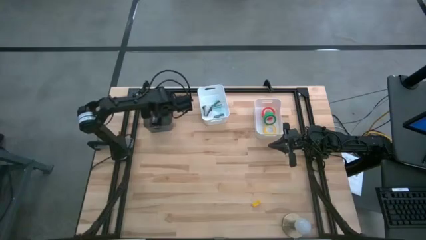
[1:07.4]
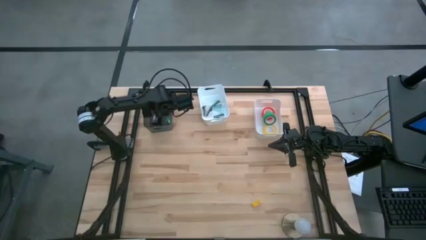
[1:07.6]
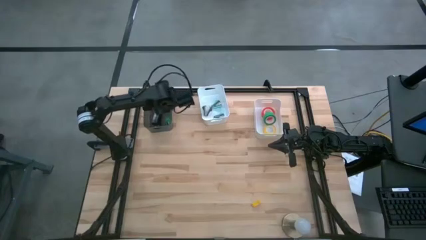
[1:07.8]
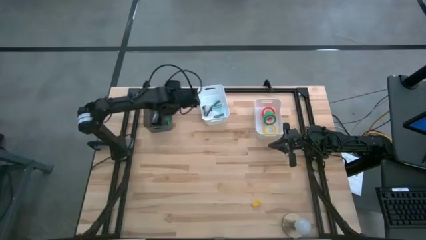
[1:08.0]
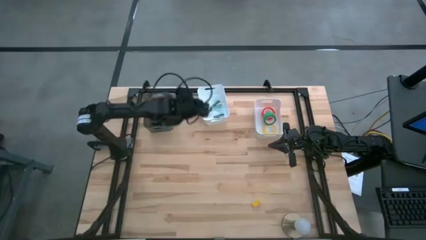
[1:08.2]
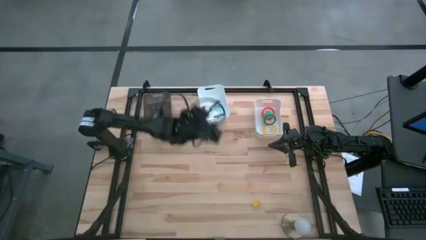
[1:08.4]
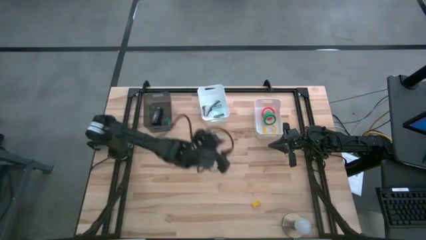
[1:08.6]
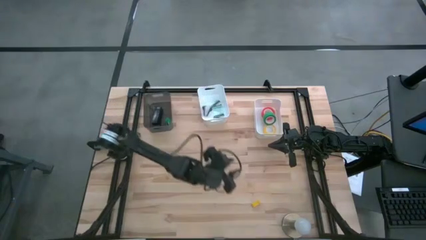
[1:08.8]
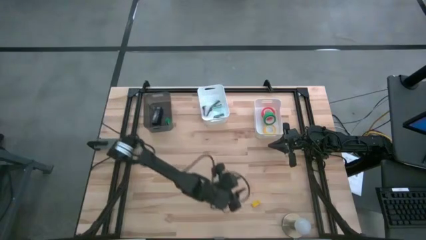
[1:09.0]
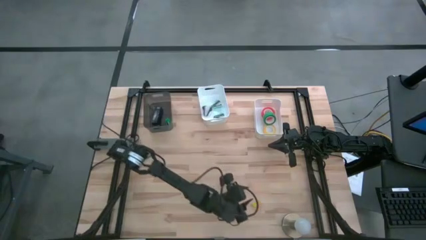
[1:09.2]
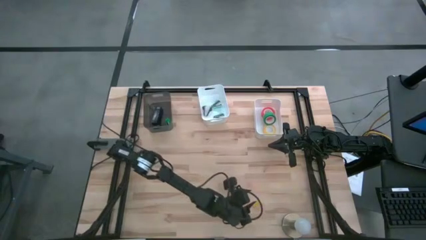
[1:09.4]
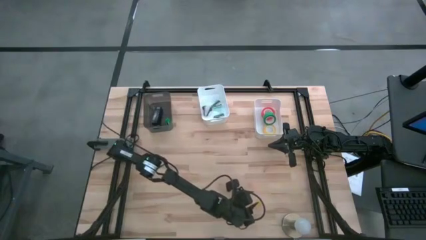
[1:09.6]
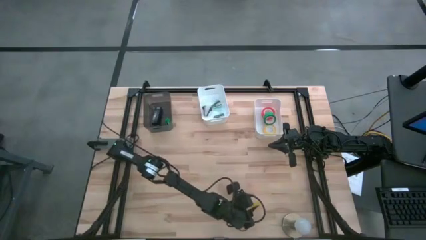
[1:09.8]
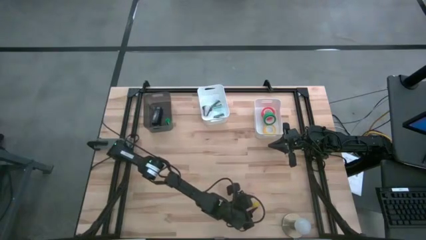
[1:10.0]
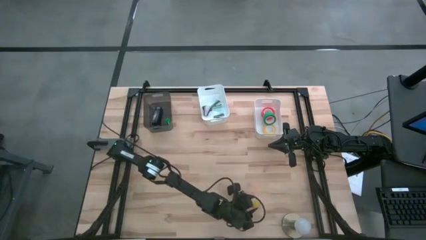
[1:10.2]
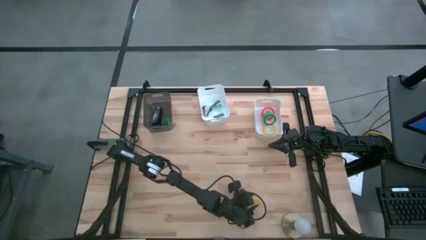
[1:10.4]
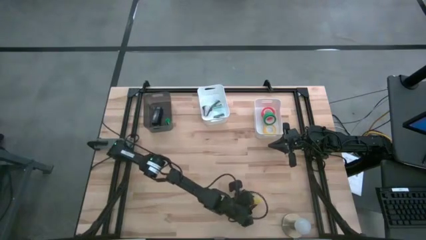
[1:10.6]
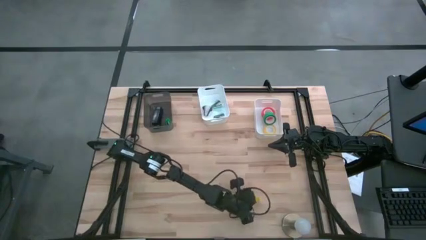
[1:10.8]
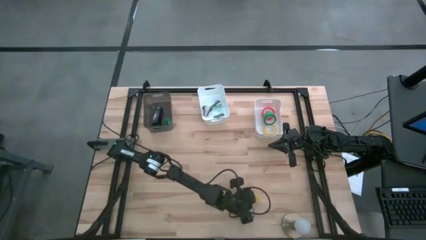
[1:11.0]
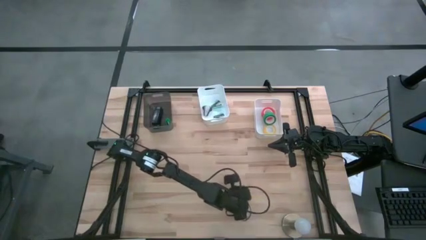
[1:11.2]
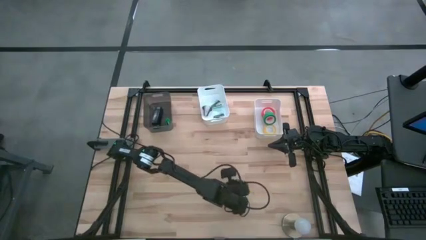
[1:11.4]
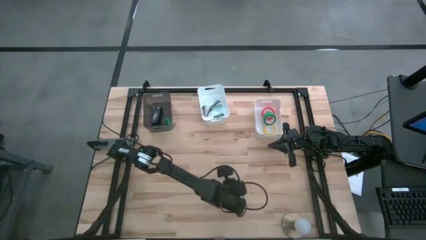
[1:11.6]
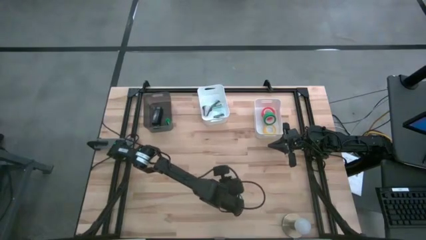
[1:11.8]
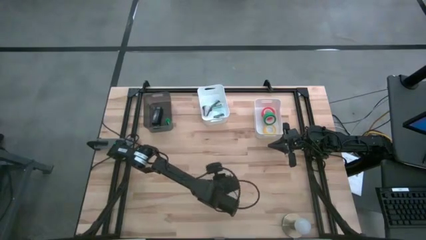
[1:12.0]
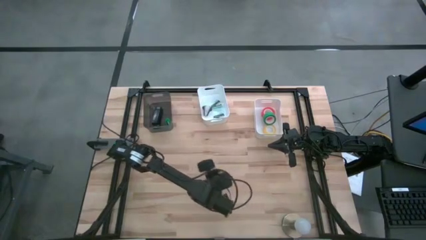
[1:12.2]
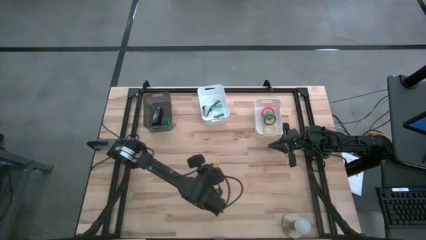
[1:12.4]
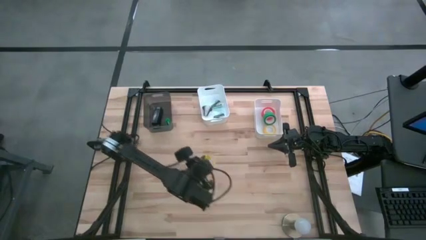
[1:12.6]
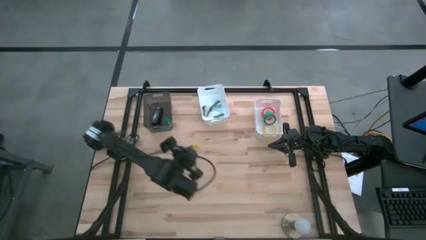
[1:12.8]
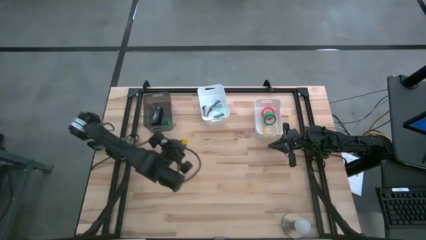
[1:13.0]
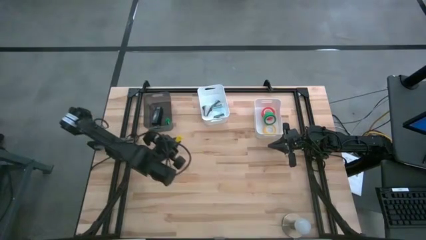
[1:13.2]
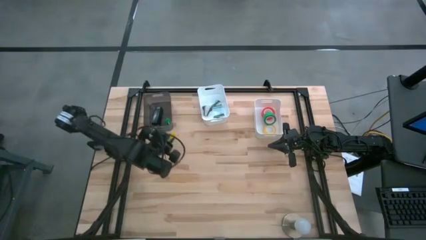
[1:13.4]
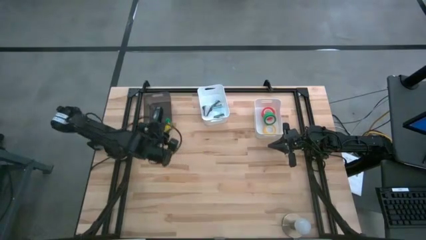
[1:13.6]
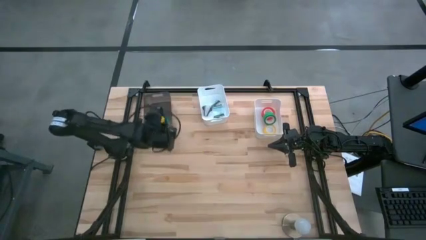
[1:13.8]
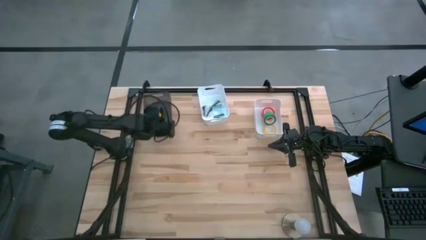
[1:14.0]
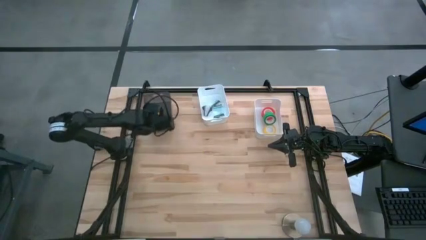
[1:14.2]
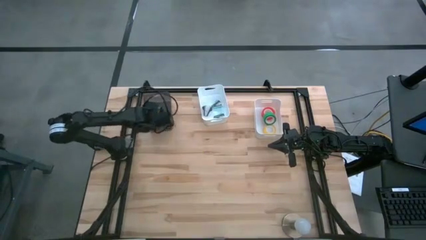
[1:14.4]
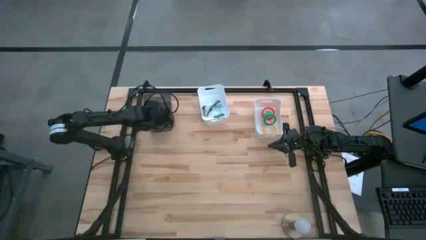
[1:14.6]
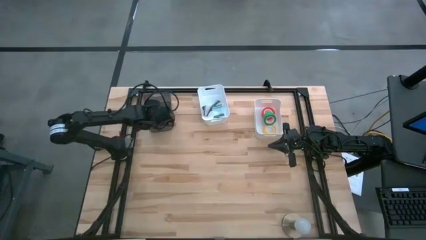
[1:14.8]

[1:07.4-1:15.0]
Task: Pick and place Stapler, Stapler remover, tape
Put the yellow stapler into the black bin

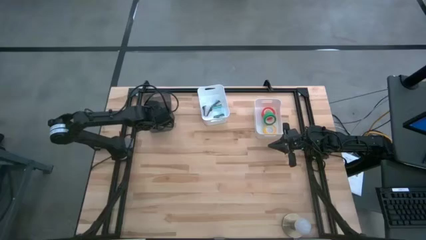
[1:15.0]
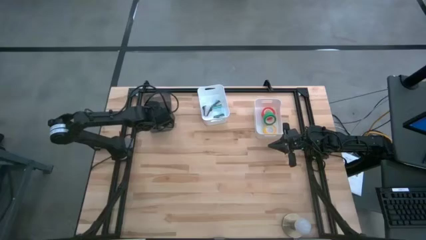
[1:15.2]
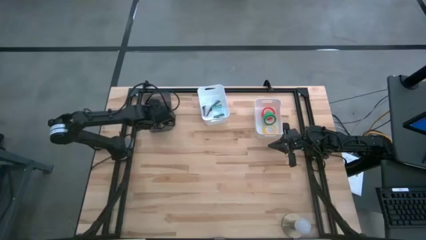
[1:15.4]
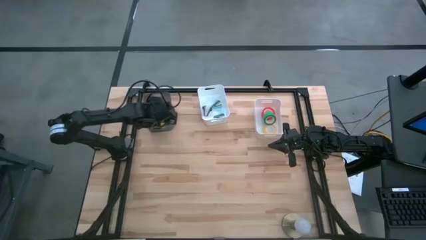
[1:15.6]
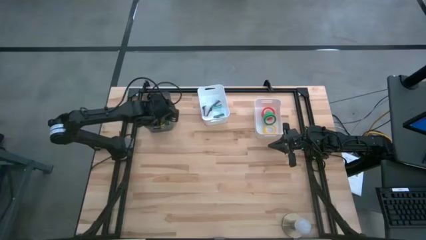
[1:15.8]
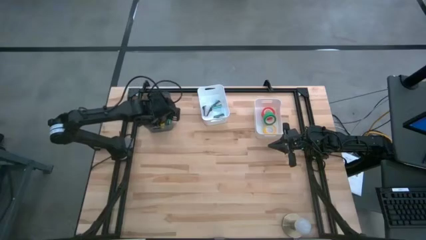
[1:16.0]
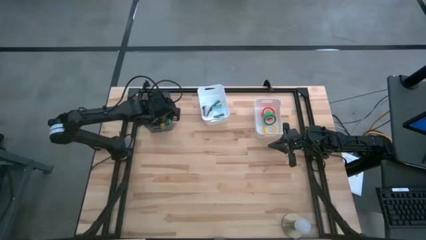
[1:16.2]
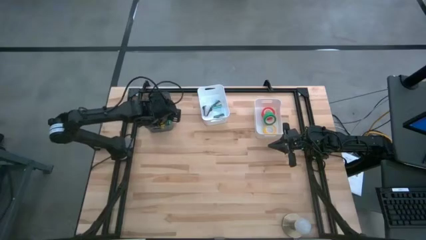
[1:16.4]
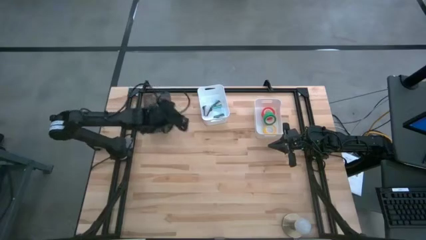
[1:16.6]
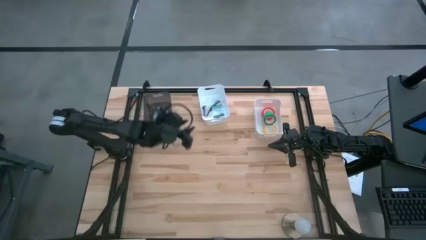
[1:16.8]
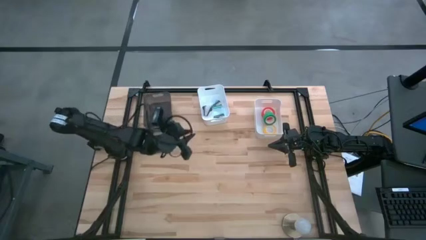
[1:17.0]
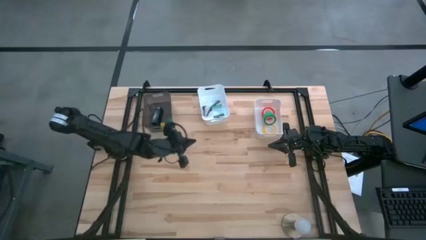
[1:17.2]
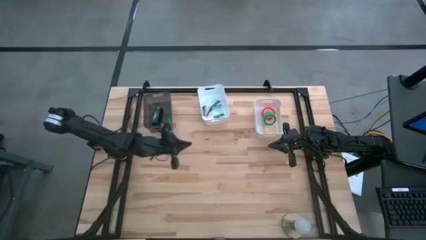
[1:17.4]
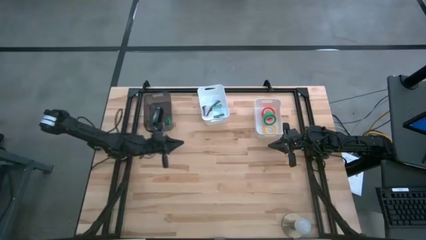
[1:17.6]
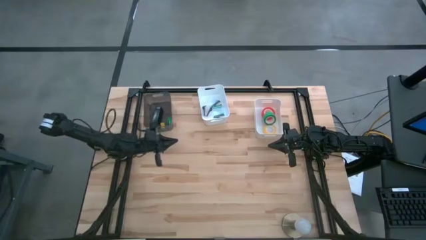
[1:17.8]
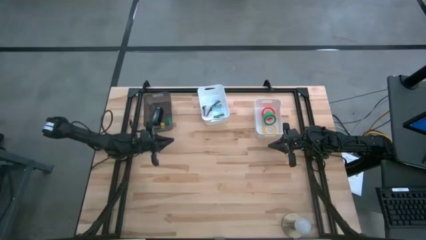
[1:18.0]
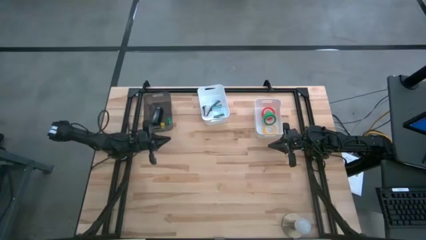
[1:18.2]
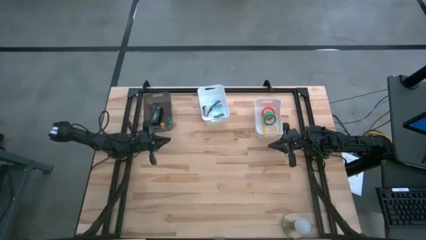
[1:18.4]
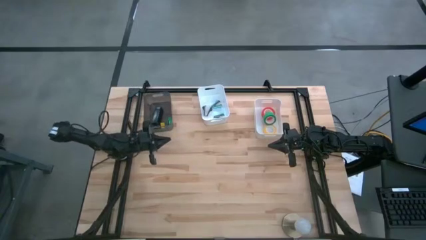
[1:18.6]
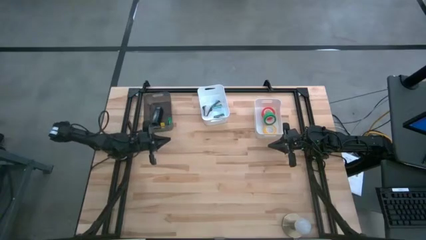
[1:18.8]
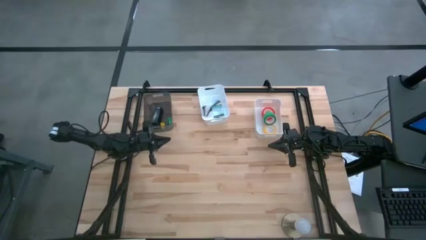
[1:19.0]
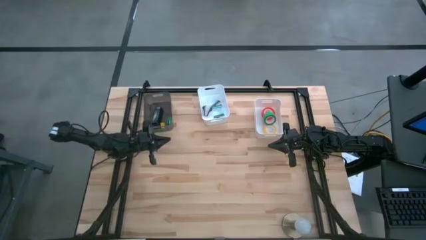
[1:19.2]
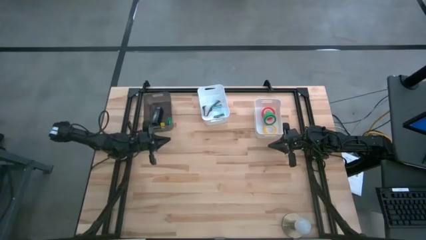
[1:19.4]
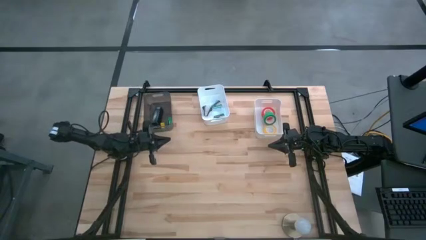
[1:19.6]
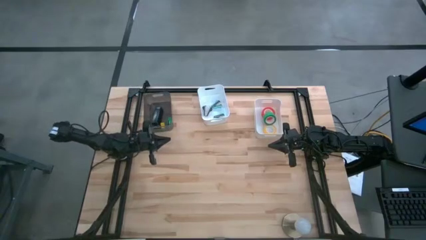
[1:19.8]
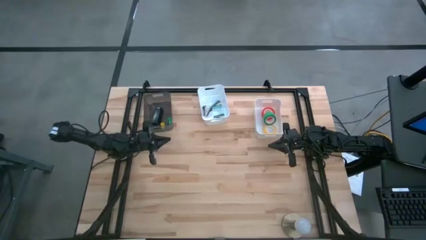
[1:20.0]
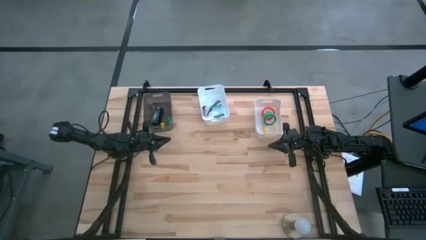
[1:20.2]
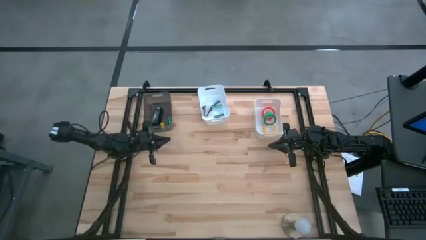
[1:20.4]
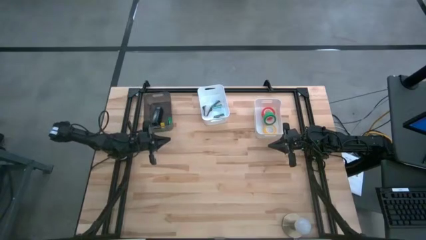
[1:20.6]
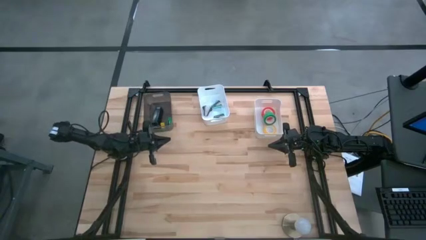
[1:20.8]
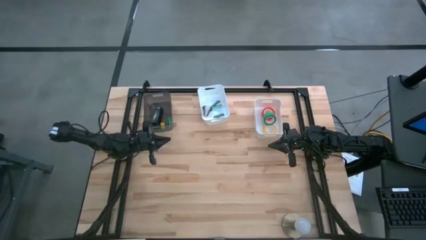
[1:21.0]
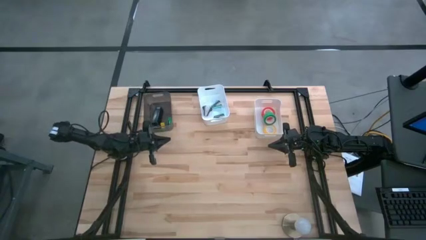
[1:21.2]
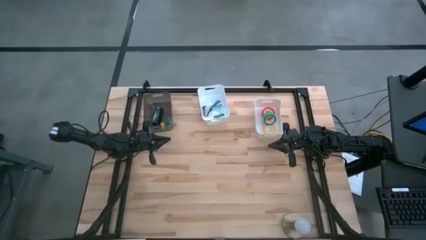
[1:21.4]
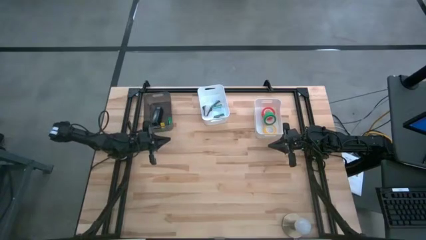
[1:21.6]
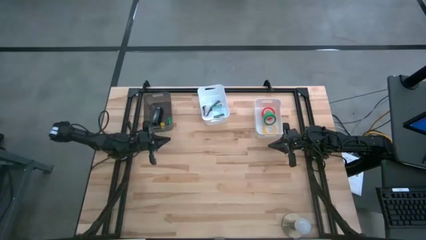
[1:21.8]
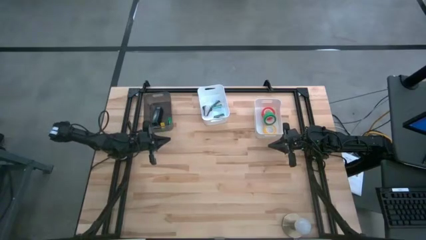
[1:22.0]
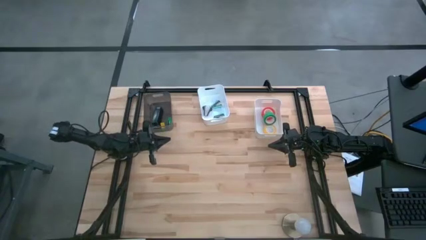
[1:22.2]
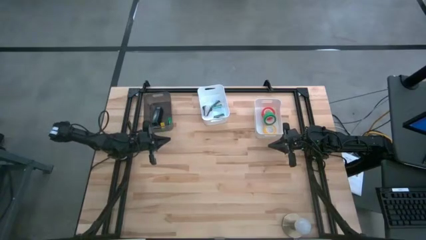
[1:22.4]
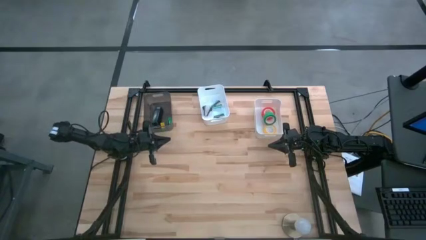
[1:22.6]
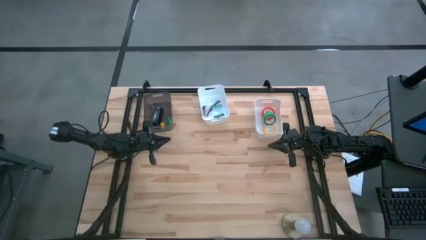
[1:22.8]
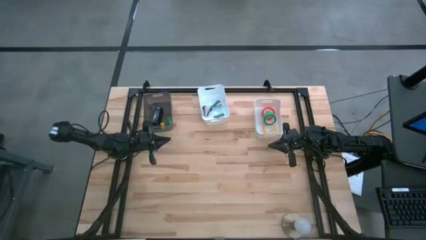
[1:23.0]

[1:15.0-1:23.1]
Return to Home Position

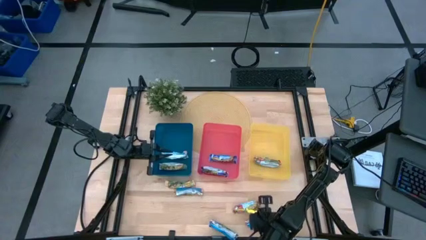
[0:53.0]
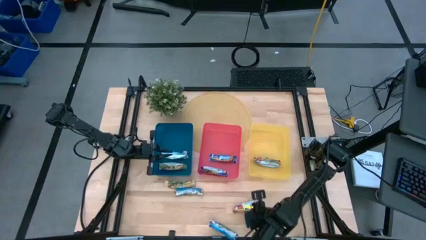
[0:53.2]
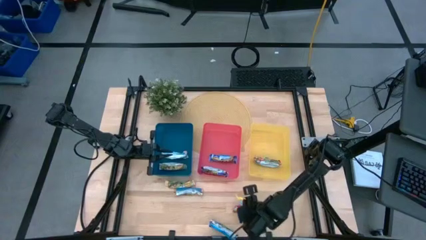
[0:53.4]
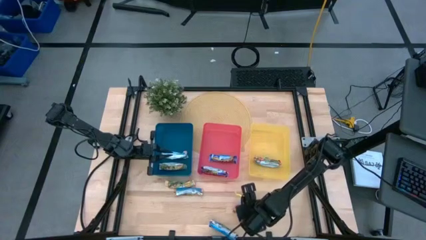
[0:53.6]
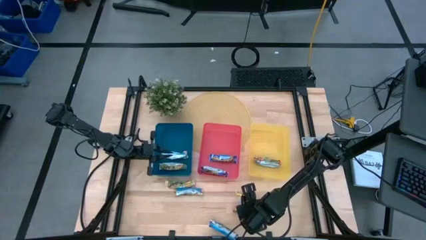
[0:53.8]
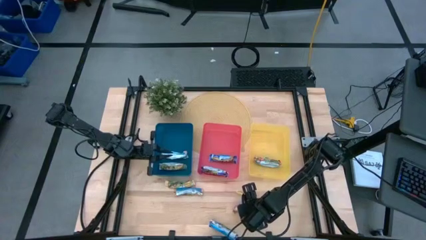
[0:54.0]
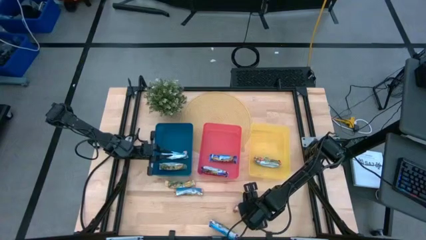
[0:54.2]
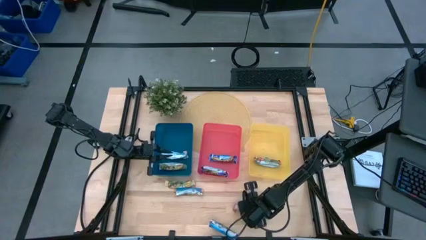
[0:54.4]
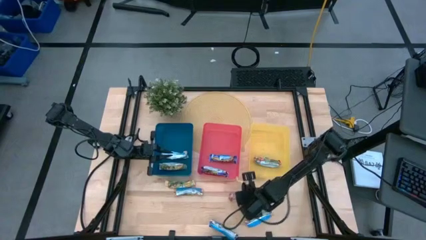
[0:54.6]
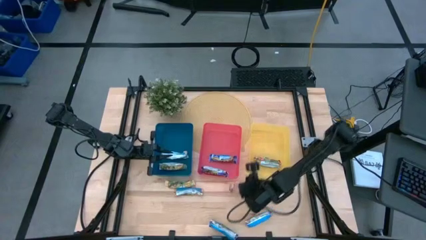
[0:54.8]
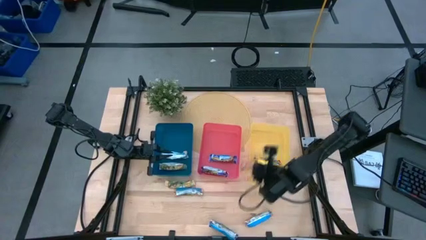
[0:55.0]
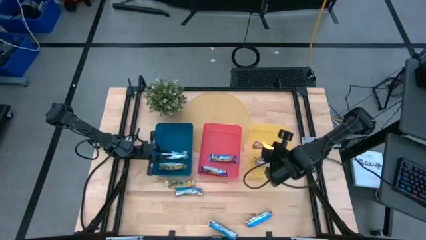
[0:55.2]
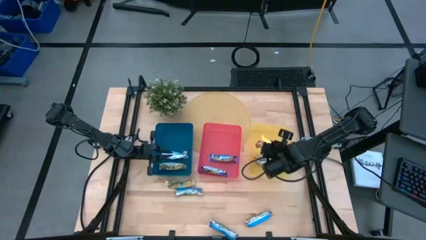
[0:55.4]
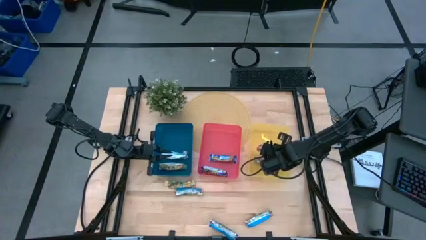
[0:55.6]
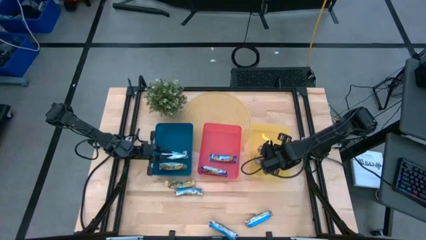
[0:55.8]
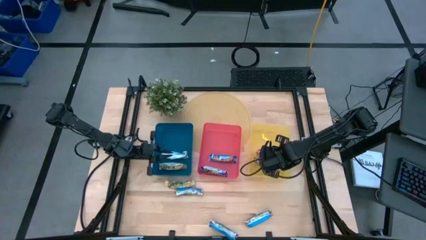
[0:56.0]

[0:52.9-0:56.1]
Task: Pick and place Granola Bars by type
Put the top red granola bar into the yellow bin
